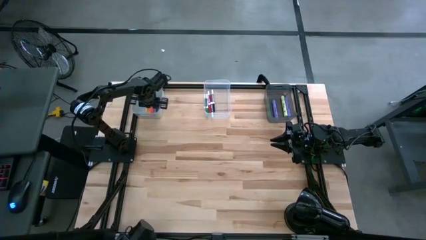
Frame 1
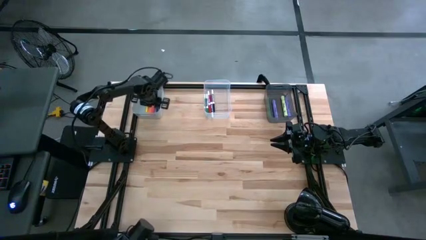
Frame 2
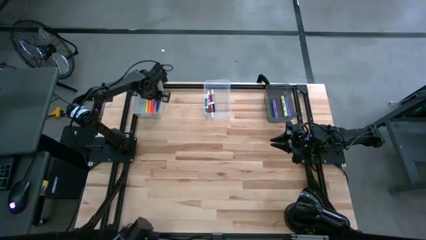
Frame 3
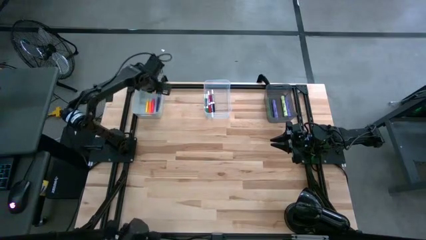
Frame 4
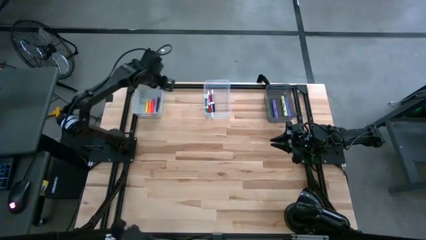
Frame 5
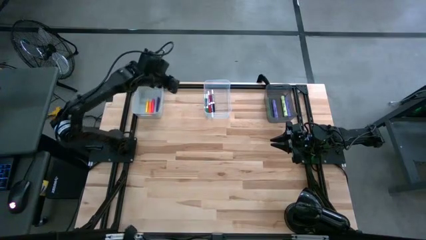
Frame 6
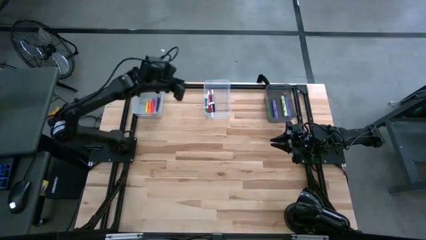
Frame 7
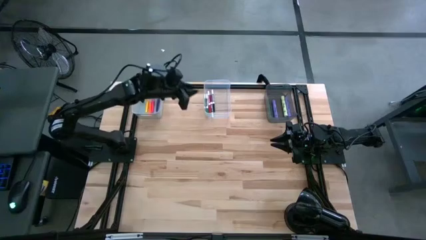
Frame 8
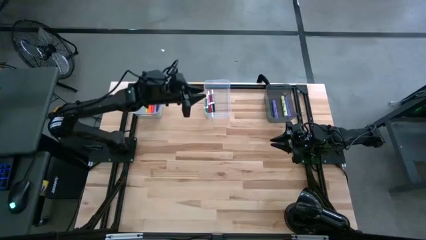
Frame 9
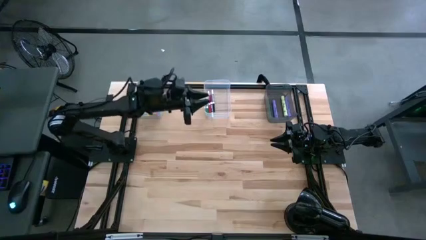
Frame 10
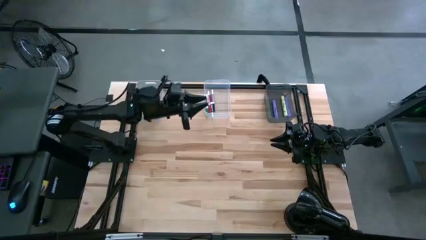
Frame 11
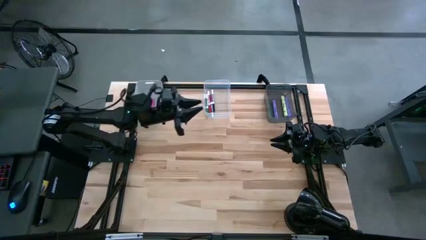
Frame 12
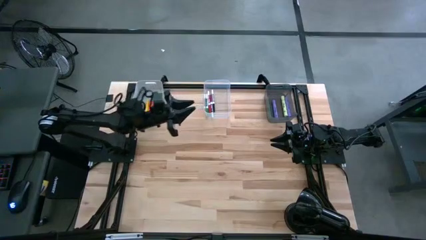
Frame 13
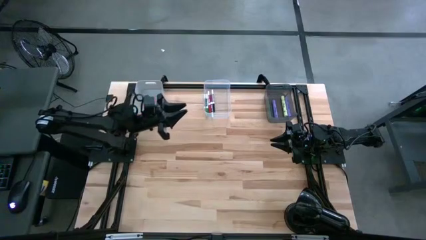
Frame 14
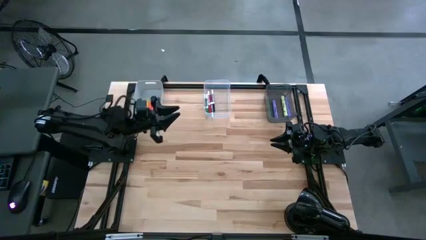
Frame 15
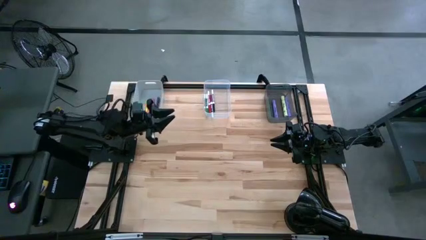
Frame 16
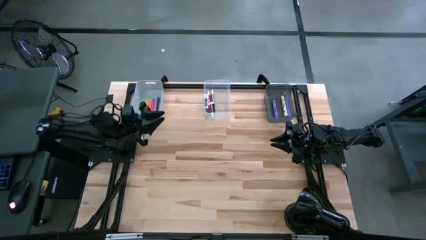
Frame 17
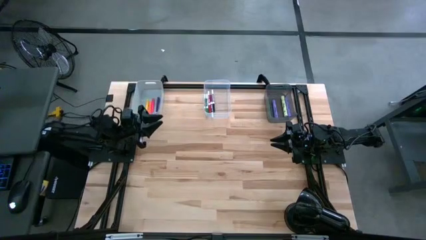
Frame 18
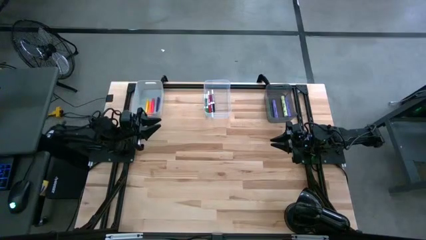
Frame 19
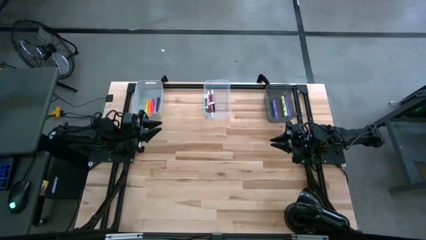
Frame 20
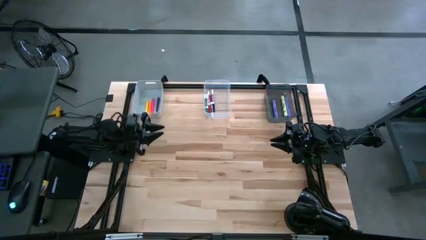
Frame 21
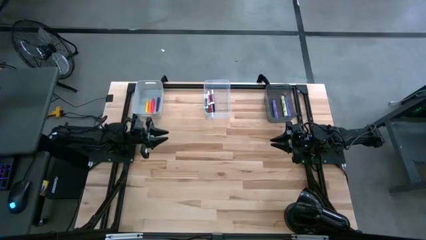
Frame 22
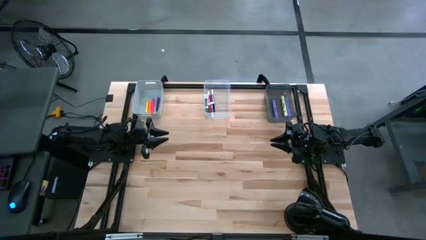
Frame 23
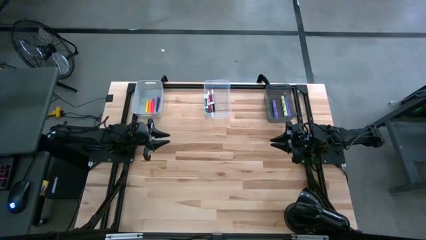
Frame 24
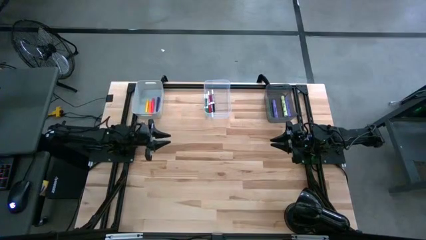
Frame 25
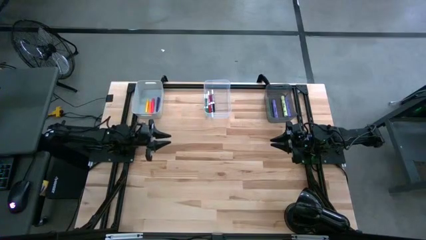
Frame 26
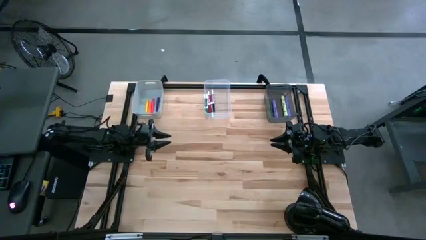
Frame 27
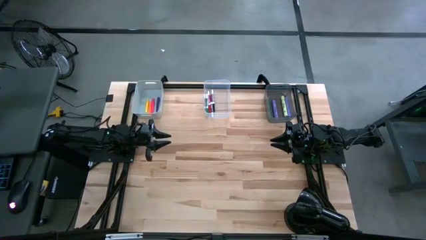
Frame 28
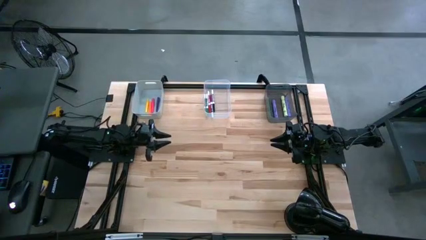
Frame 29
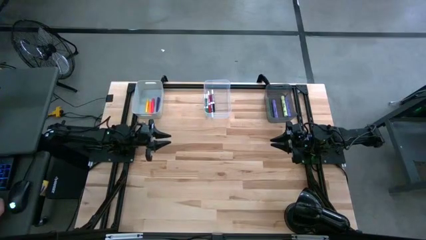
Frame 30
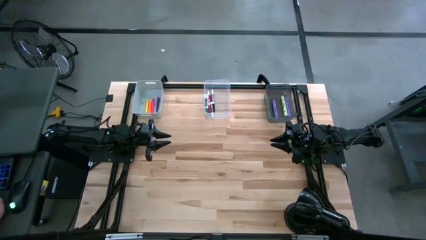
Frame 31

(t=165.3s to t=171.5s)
Task: Pick & Place Markers
Return to Home Position

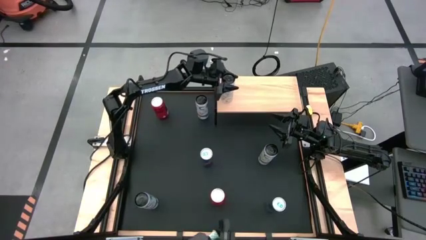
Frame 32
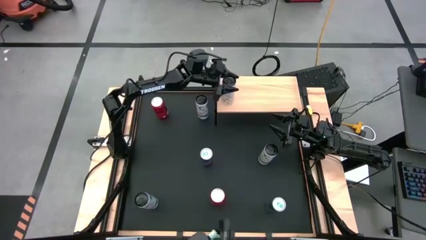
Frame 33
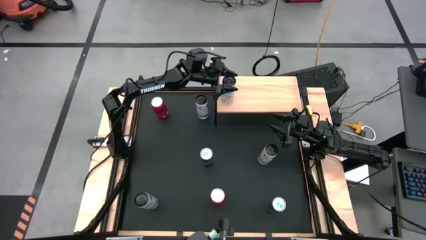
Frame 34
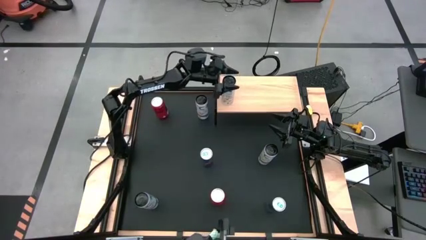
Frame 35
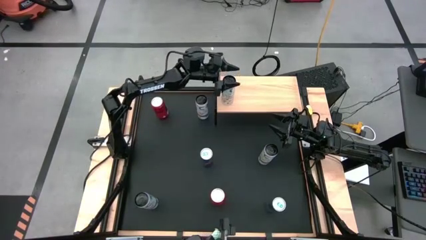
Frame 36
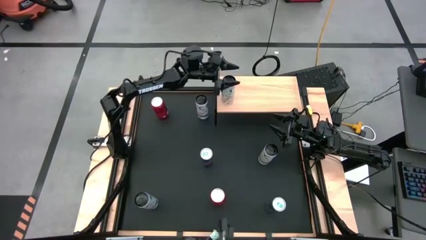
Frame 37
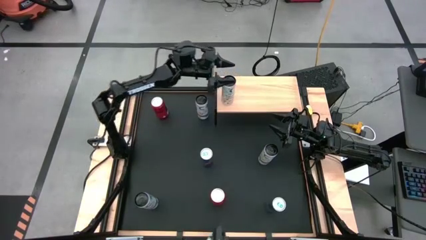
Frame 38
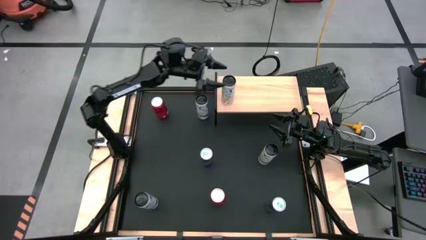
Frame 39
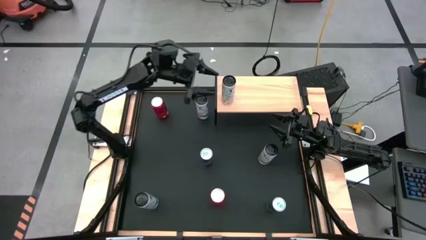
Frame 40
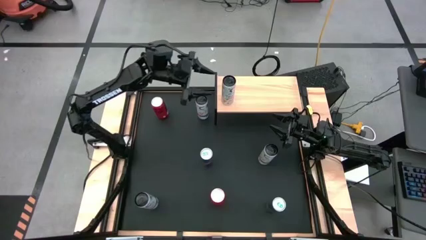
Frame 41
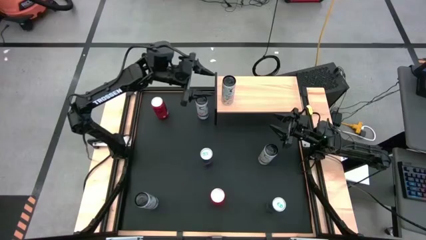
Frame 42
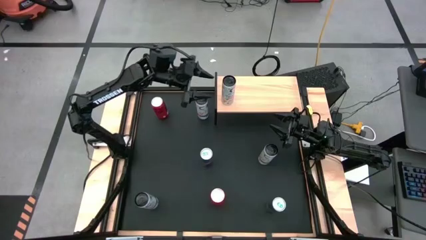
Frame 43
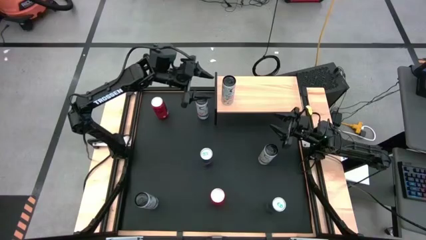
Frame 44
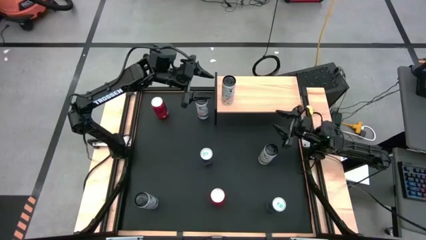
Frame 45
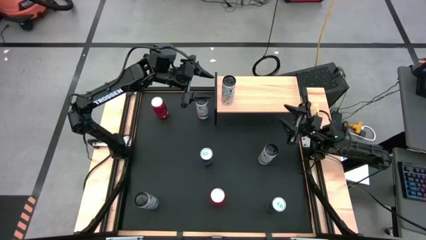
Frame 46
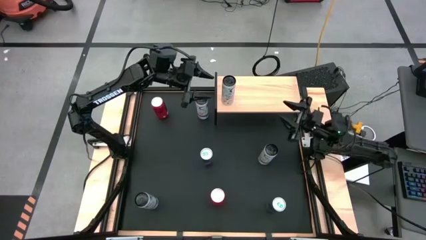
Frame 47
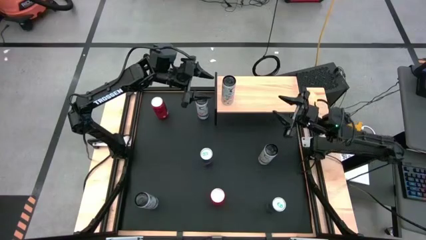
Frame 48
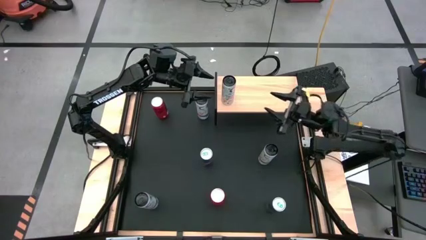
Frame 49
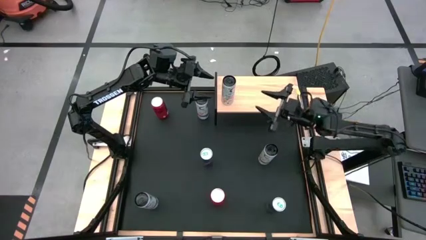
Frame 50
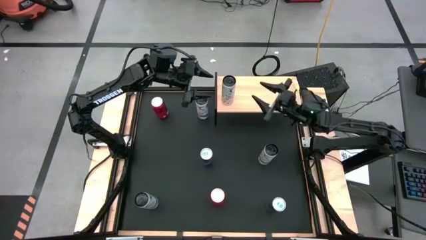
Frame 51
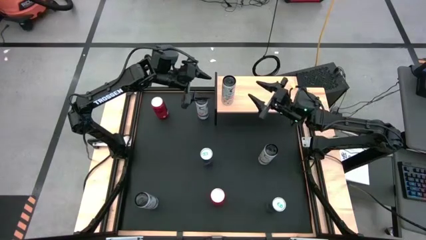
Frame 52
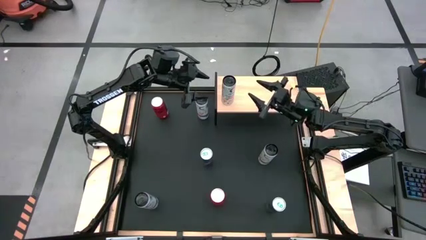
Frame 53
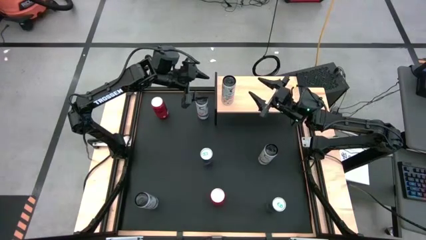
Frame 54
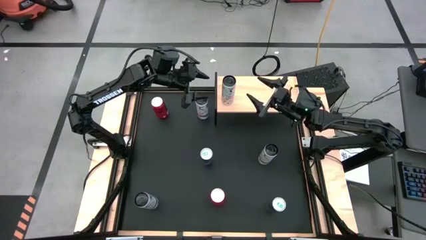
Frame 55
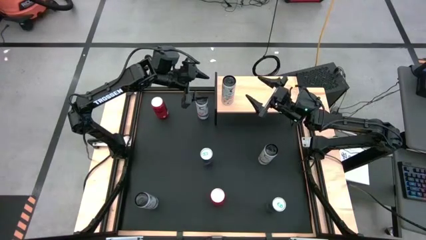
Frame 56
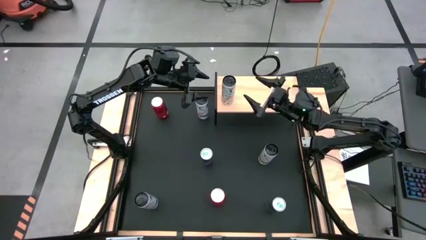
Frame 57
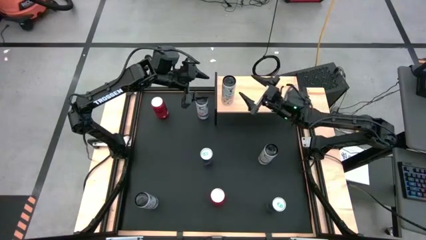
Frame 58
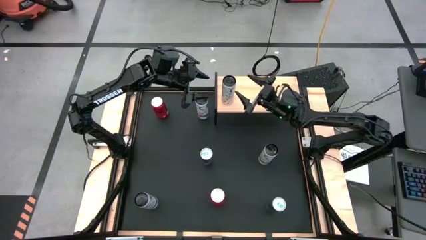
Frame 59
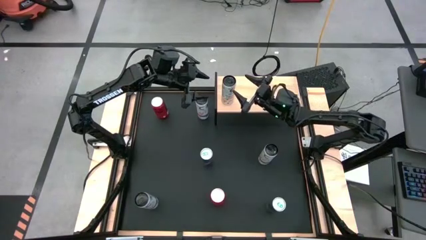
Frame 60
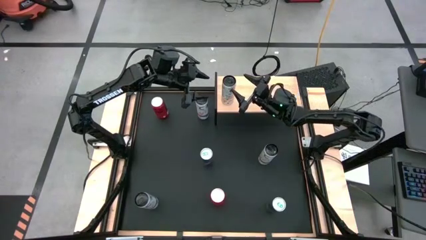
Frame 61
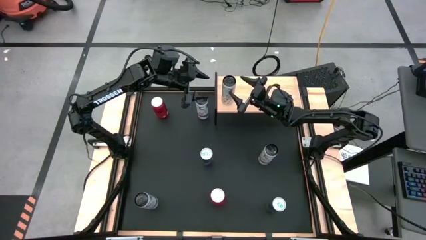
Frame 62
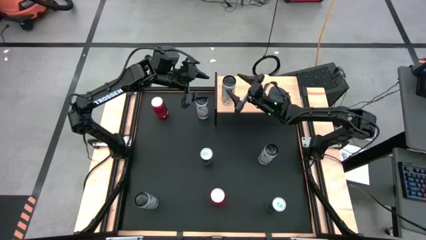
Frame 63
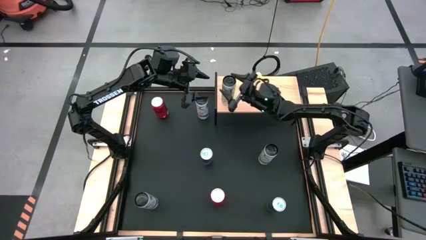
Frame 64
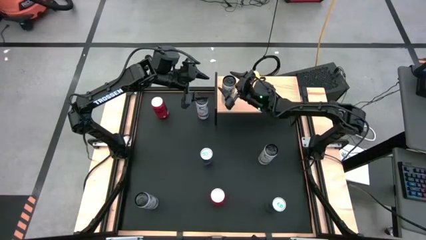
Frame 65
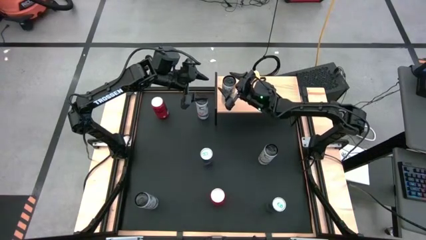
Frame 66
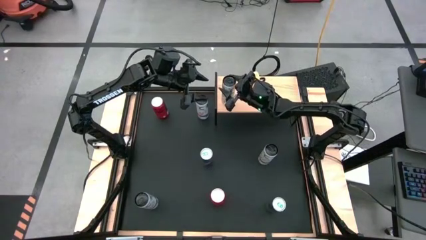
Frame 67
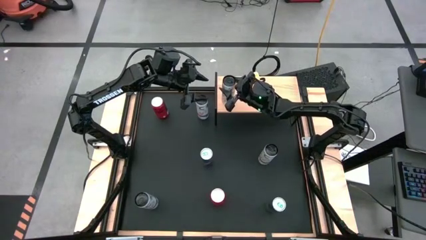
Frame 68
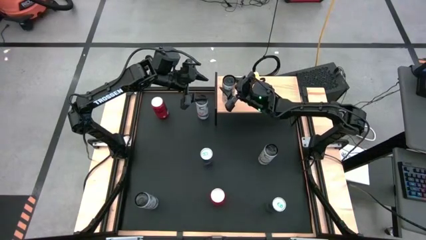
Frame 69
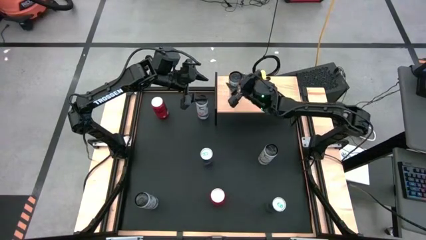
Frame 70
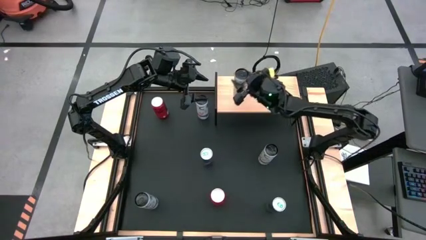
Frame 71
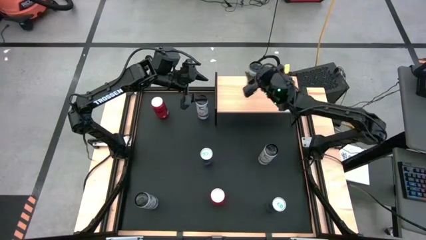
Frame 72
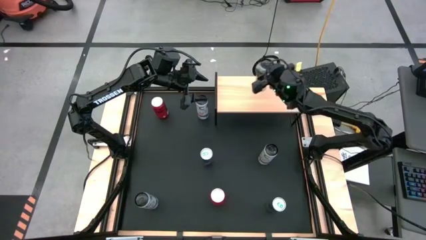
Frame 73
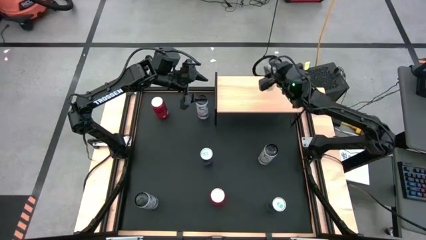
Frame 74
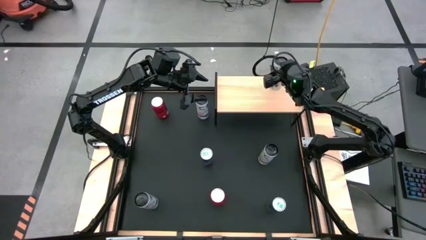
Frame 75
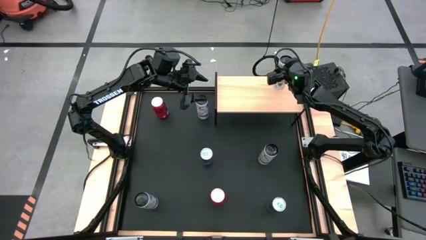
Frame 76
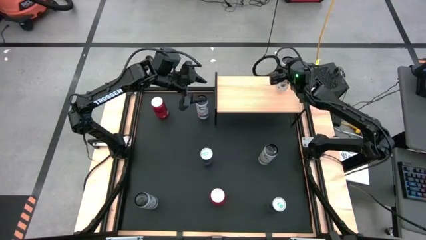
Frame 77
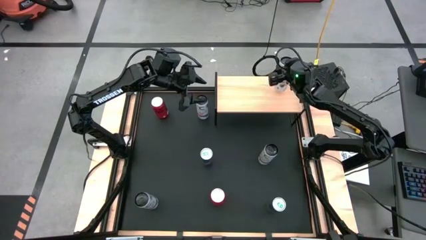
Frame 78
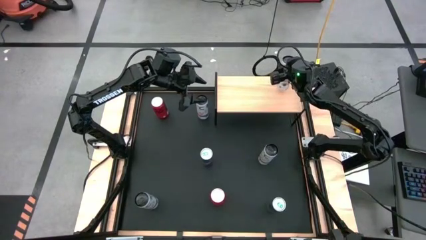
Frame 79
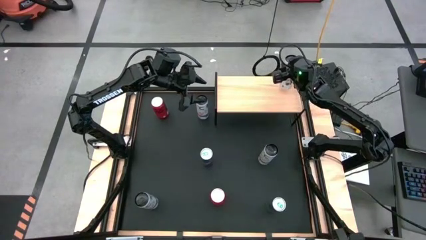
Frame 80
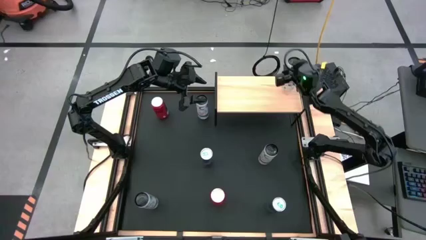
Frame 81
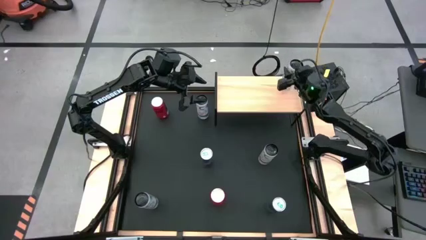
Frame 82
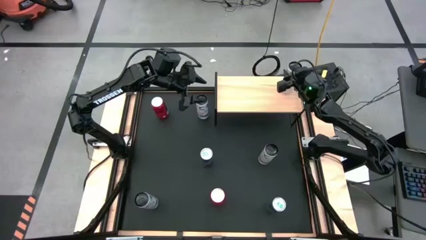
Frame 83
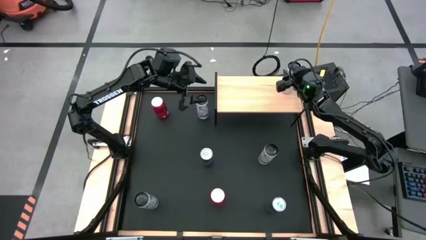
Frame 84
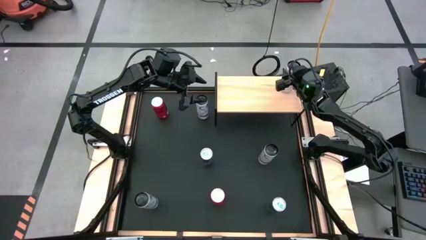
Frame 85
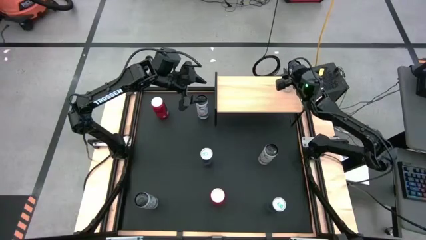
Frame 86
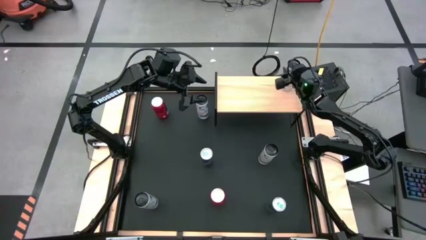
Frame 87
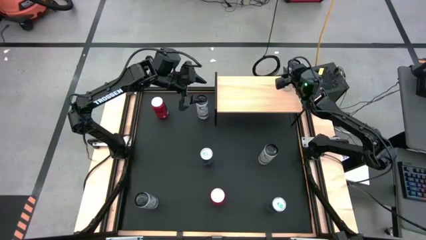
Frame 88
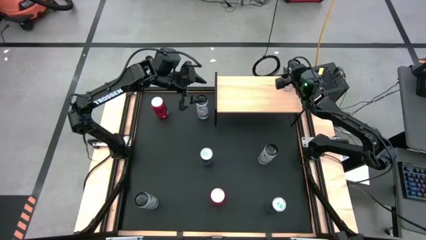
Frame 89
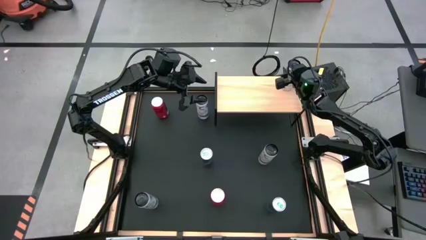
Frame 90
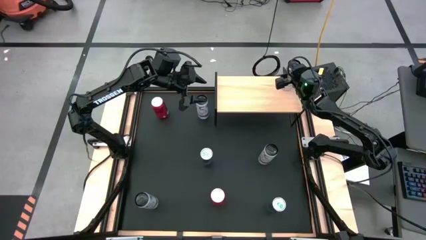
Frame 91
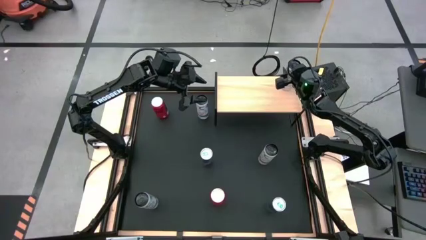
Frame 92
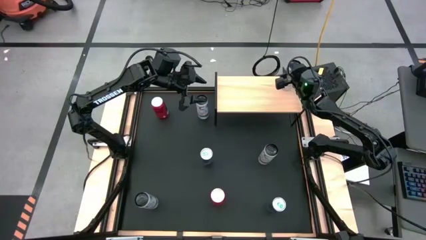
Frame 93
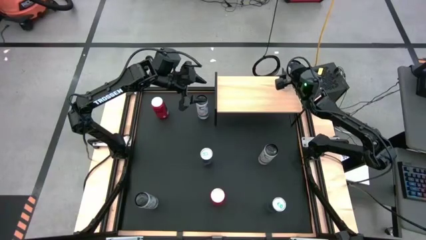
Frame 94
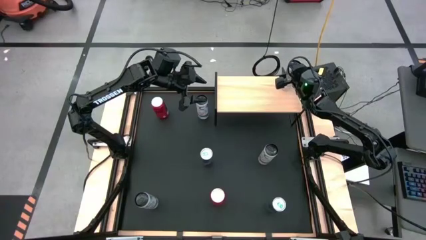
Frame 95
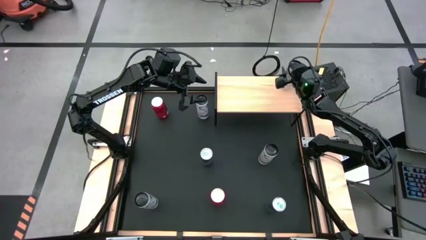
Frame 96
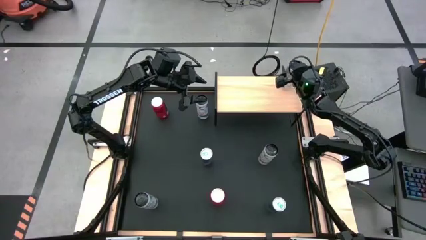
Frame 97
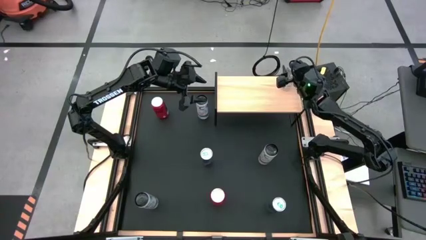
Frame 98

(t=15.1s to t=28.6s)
Task: Place canned beverage on shelf
Put the left white-yellow soda can on the shelf
